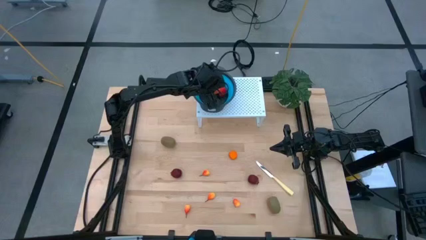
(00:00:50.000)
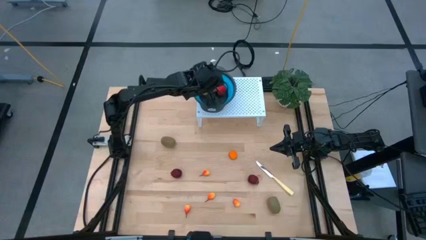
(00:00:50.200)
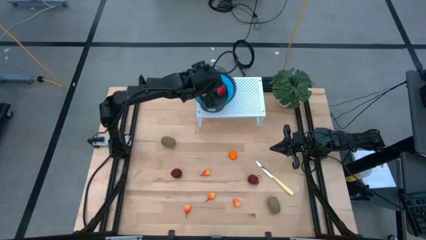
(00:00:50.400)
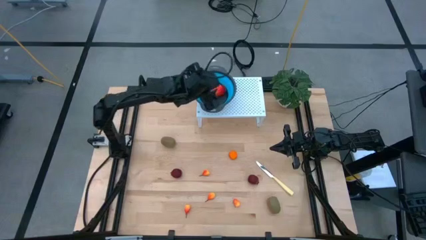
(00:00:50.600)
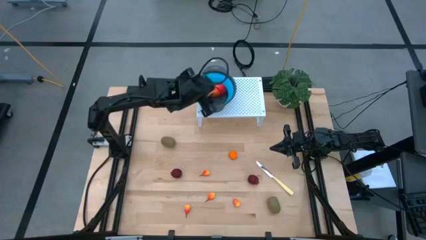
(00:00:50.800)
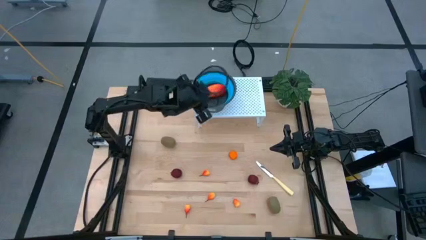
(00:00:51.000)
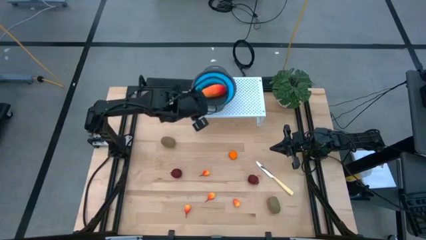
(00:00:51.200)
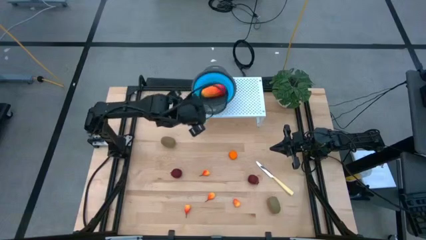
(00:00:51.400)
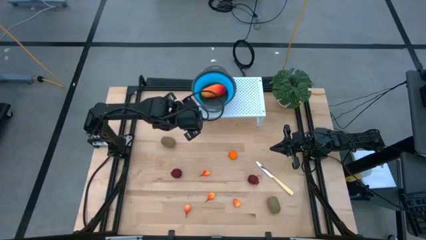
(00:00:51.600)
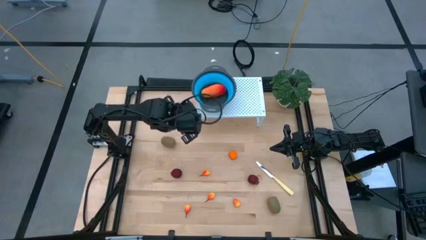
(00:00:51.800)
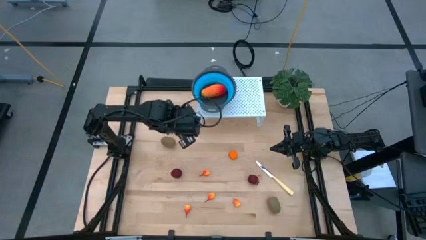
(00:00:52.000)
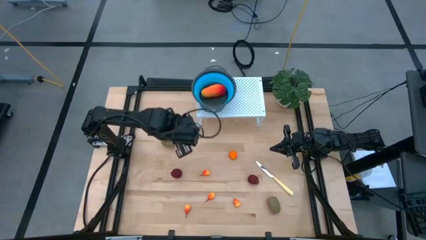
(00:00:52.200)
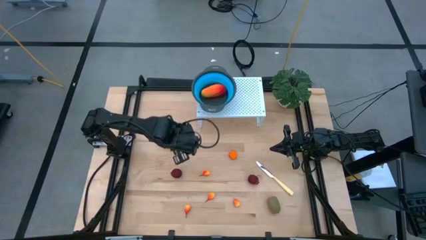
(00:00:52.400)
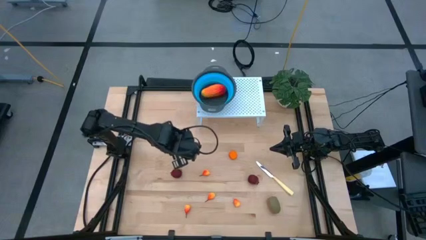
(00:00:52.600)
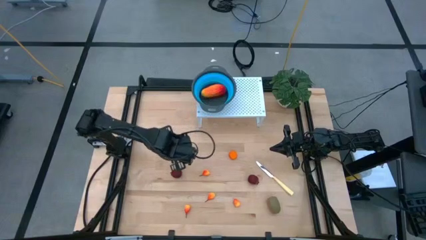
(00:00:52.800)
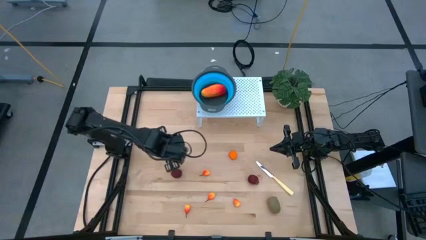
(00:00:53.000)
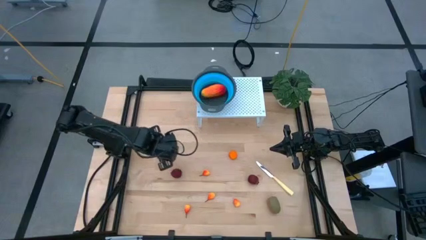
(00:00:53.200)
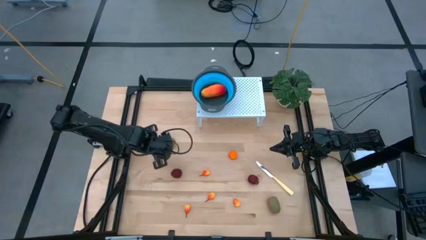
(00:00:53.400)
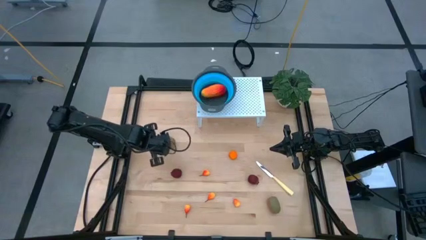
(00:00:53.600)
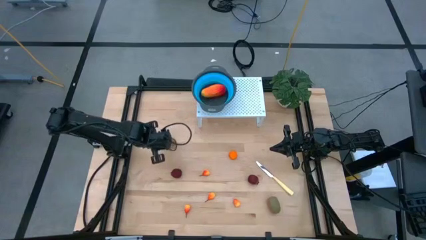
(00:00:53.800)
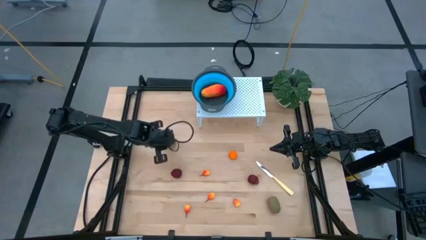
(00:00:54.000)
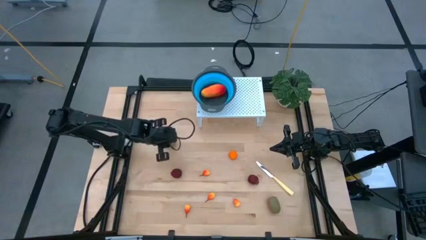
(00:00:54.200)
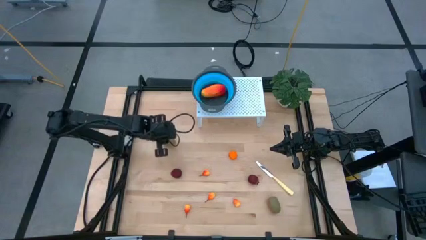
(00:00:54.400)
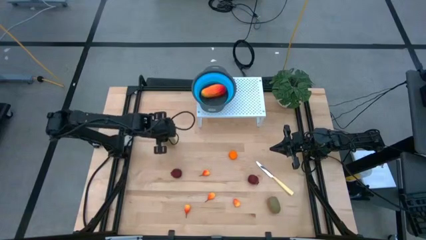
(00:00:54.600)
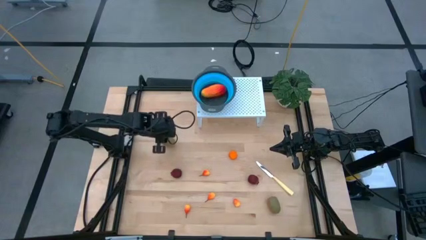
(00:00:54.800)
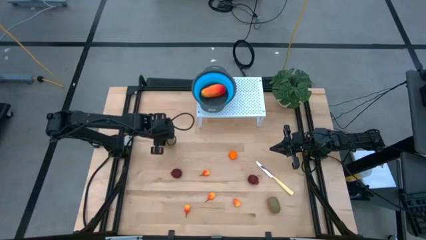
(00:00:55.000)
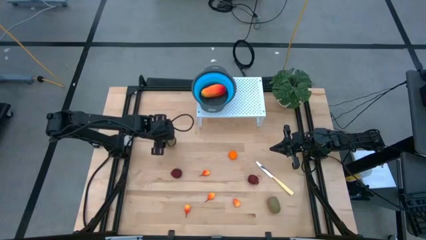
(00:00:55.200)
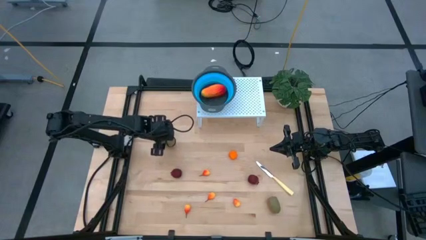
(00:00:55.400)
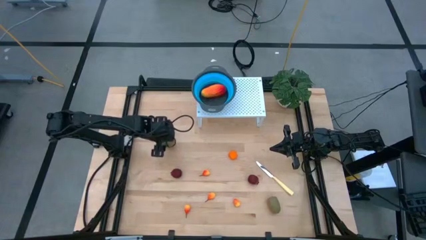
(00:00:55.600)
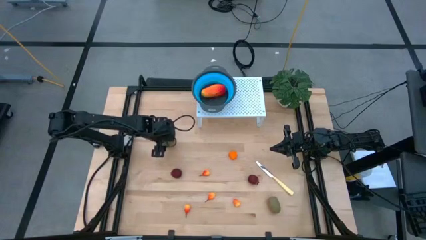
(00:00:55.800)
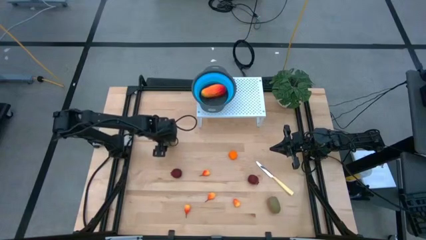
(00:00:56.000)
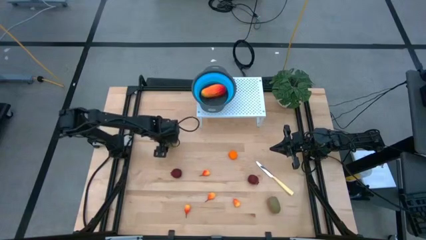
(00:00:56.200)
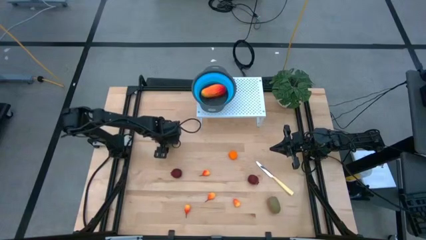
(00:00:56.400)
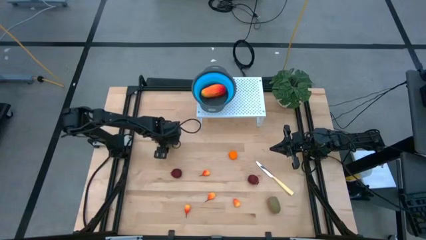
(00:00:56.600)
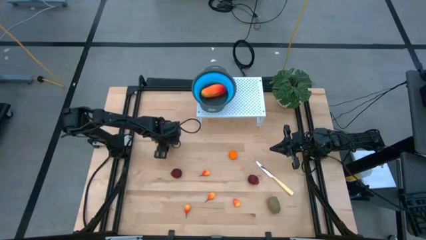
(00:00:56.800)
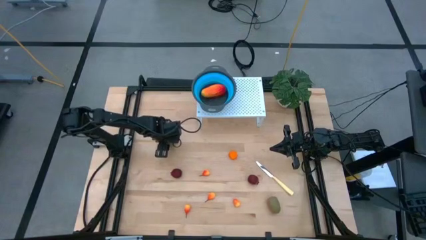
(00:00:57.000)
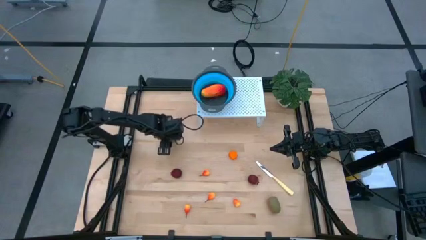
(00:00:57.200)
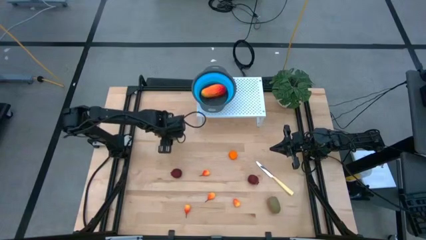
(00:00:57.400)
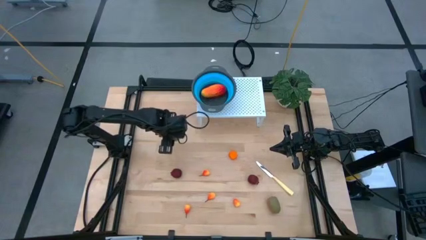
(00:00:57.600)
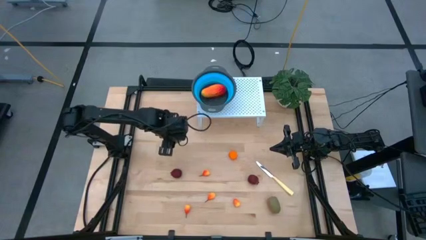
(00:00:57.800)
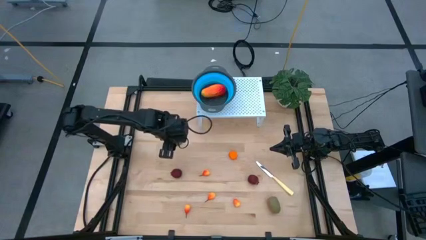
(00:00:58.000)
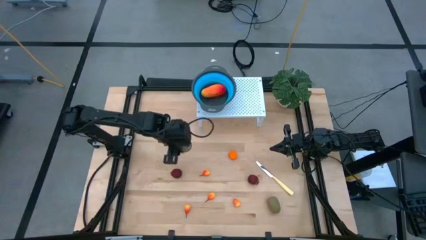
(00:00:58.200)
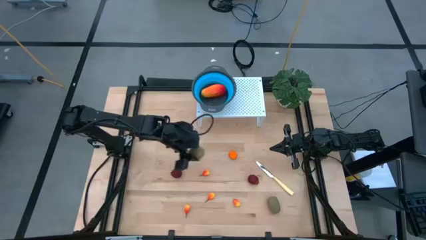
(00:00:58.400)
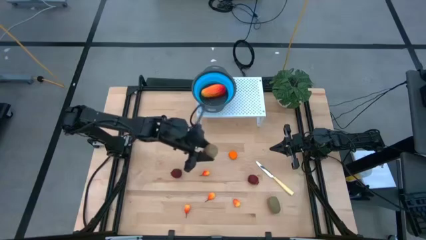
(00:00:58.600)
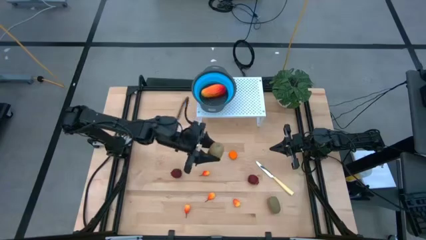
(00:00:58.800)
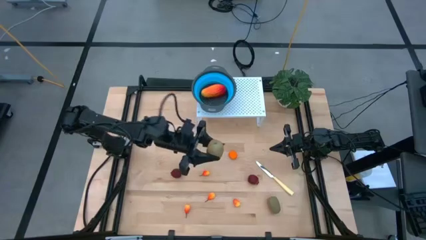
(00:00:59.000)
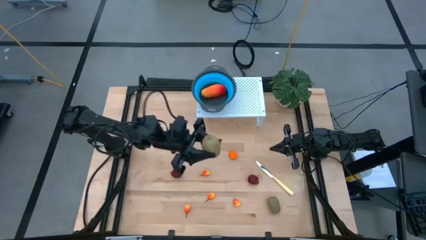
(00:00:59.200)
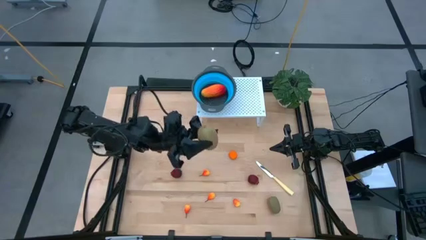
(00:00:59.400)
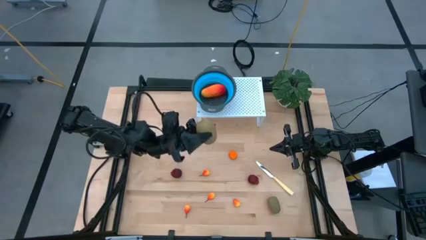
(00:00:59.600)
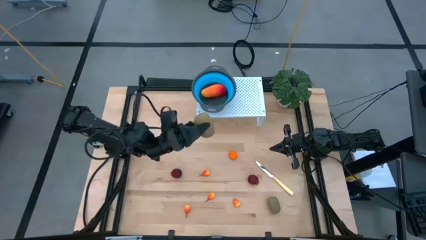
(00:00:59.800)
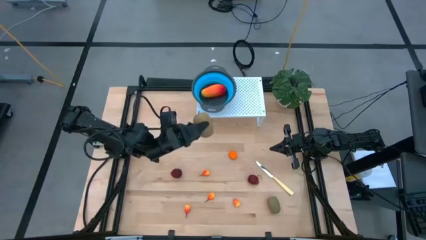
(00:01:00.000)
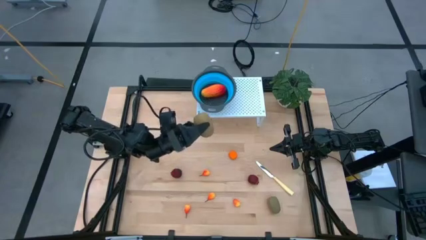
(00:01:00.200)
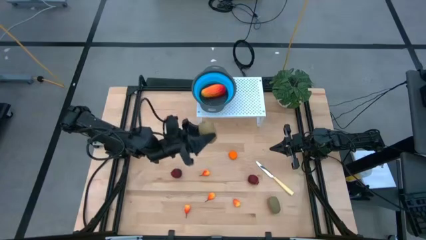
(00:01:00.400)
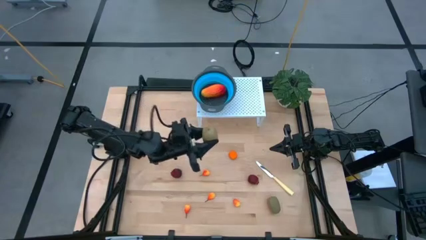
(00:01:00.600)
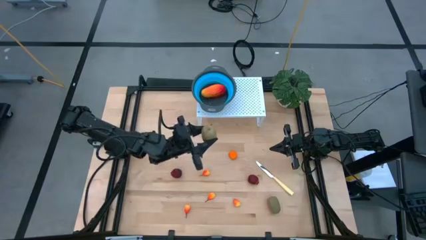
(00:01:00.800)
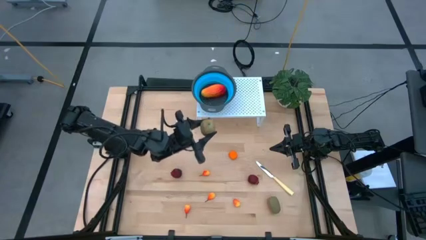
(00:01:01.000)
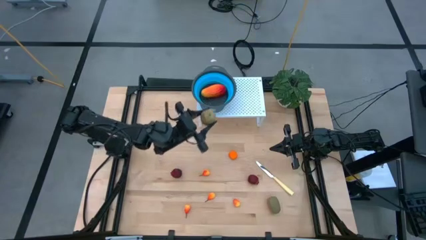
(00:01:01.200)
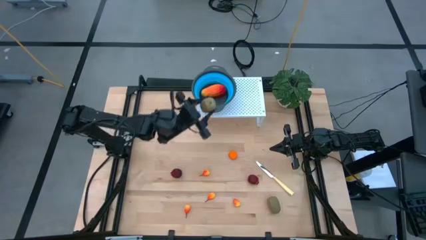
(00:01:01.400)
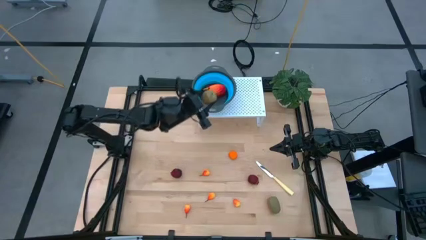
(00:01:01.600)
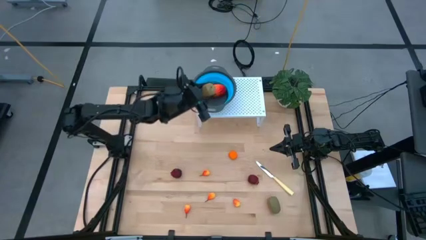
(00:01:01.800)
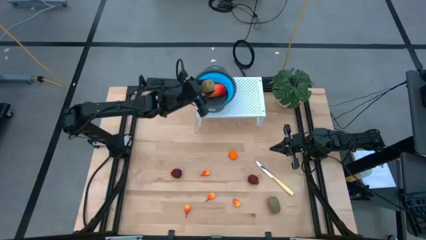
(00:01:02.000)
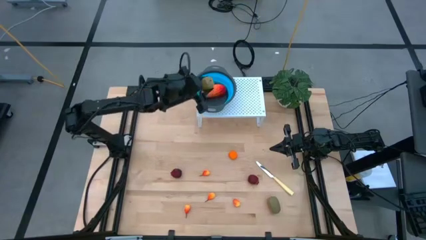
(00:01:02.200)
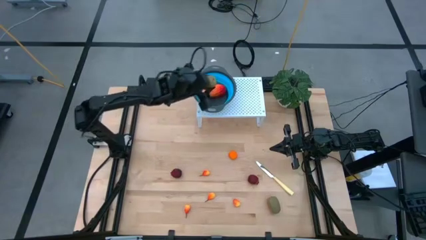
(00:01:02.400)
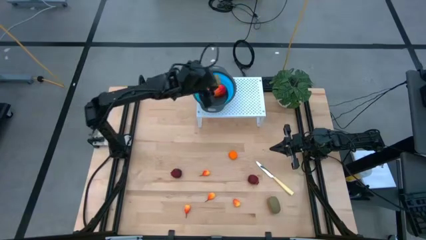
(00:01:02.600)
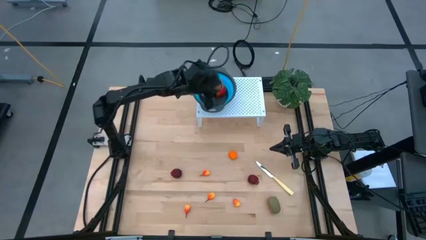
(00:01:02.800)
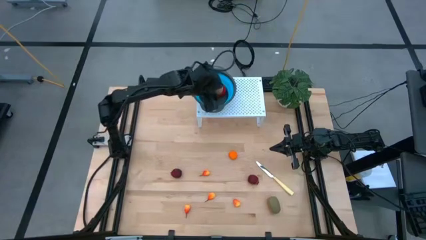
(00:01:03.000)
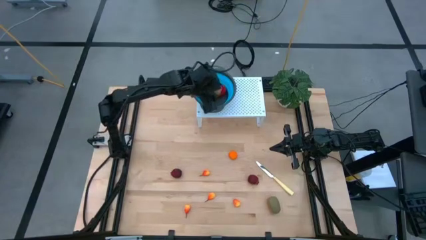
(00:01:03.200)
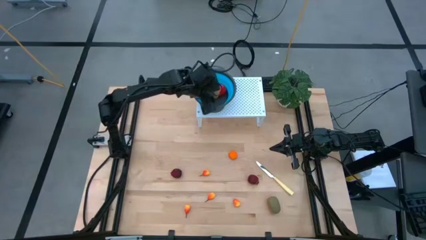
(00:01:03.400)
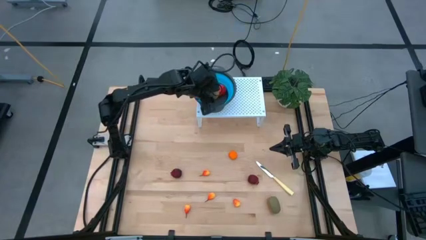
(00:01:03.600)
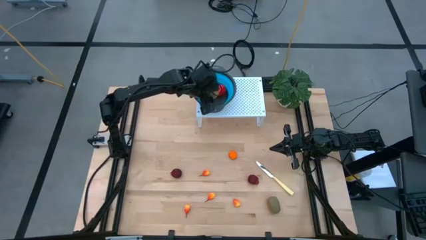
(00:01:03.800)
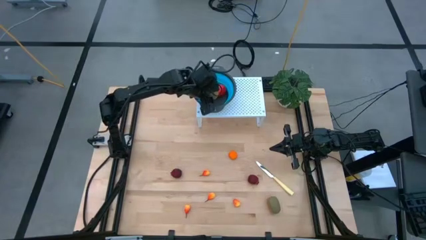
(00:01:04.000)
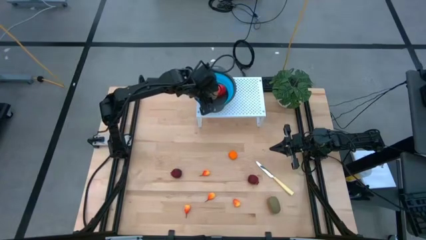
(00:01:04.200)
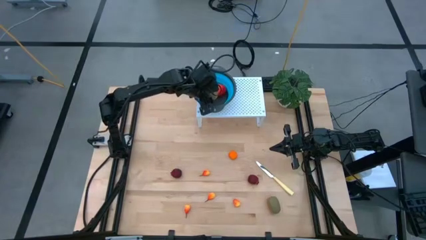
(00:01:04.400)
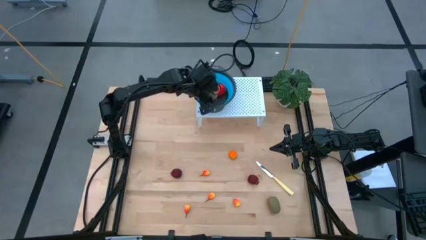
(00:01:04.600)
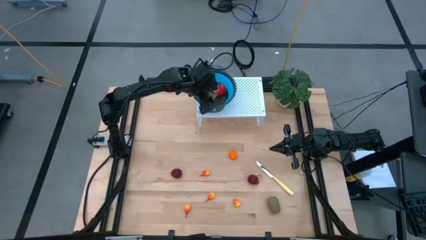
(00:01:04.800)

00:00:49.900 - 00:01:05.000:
Task: Pick & Place Fruit
Put the kiwi into the blue strainer bowl on the shelf
